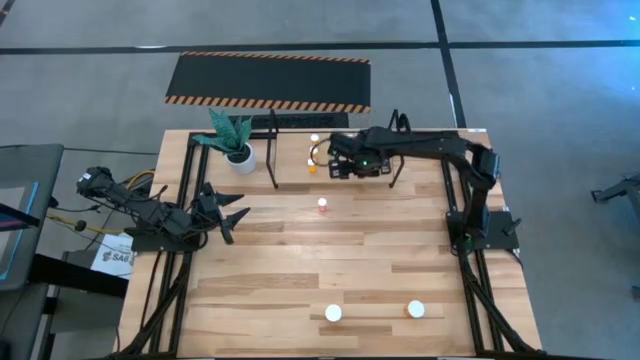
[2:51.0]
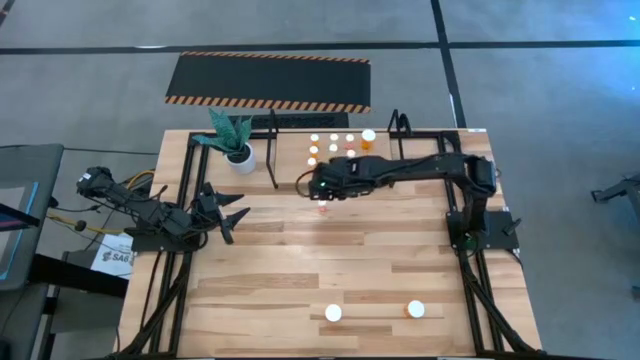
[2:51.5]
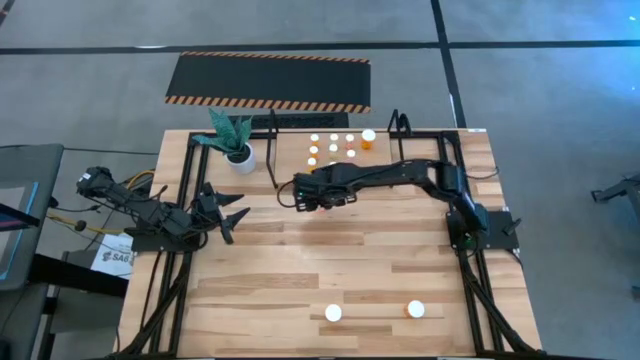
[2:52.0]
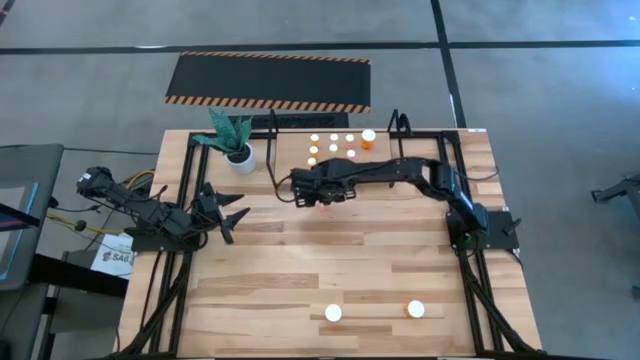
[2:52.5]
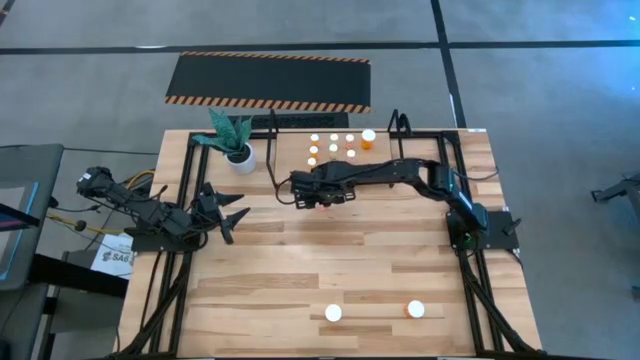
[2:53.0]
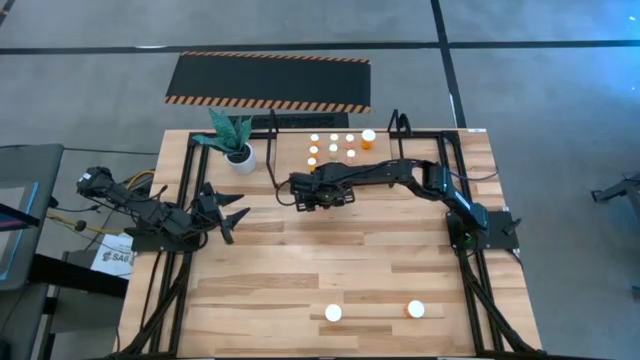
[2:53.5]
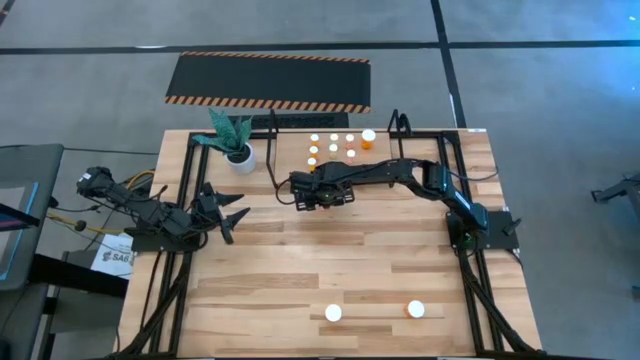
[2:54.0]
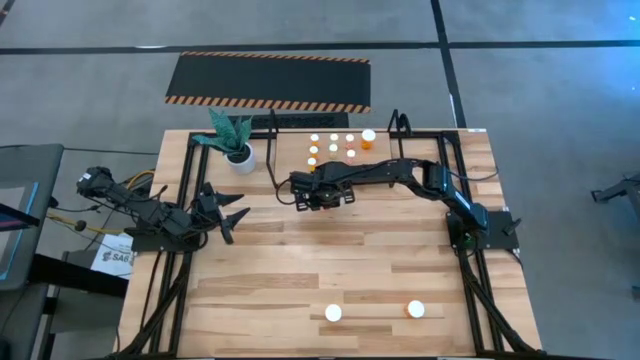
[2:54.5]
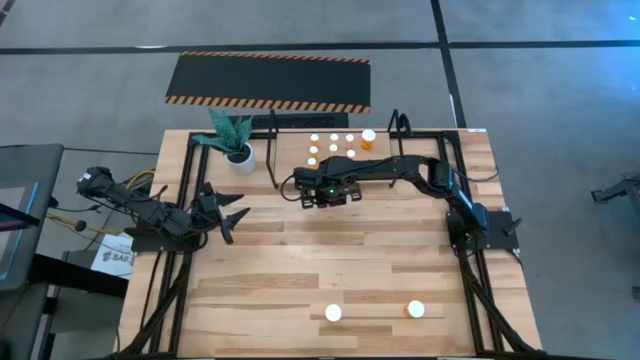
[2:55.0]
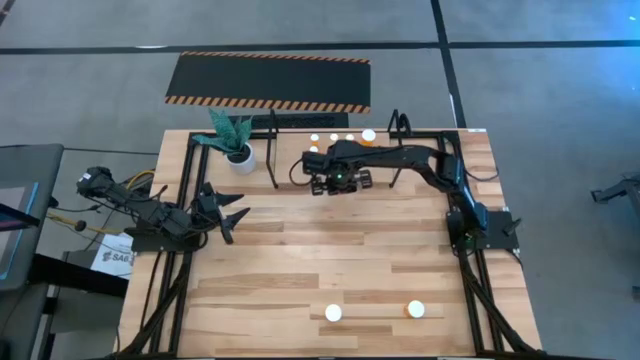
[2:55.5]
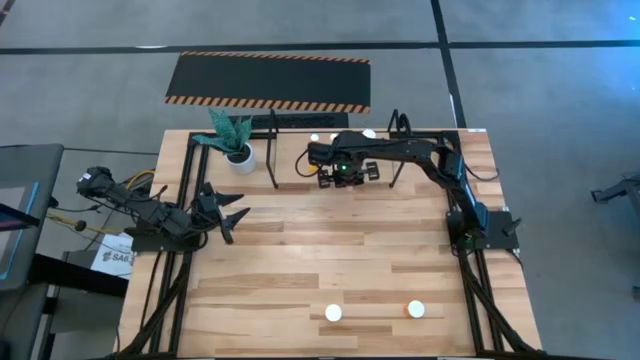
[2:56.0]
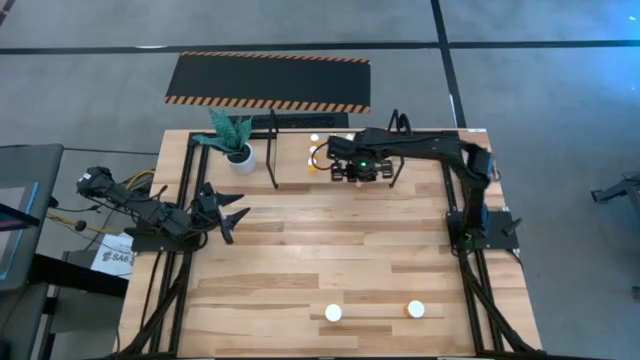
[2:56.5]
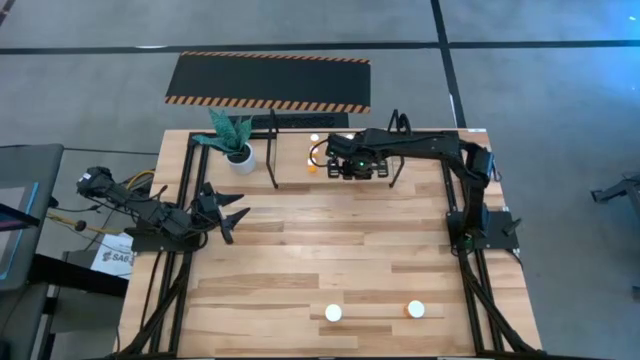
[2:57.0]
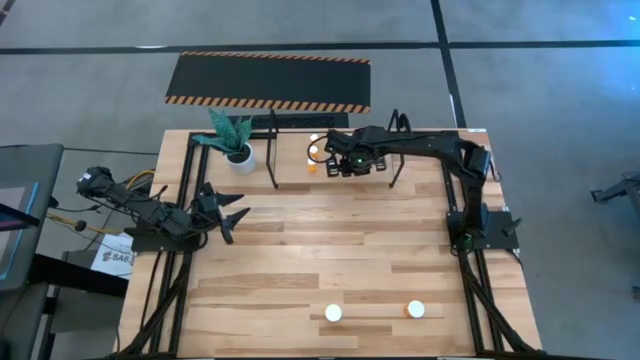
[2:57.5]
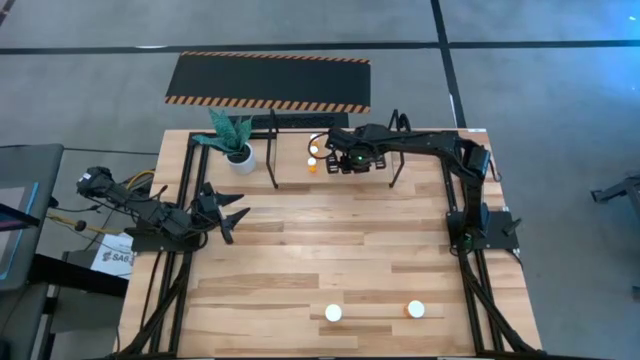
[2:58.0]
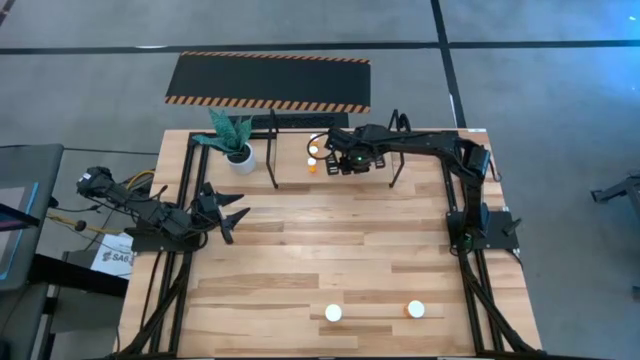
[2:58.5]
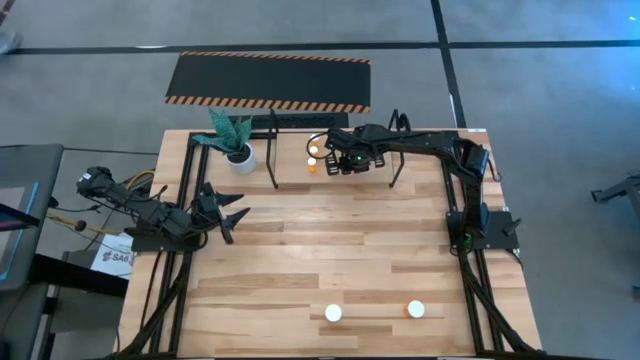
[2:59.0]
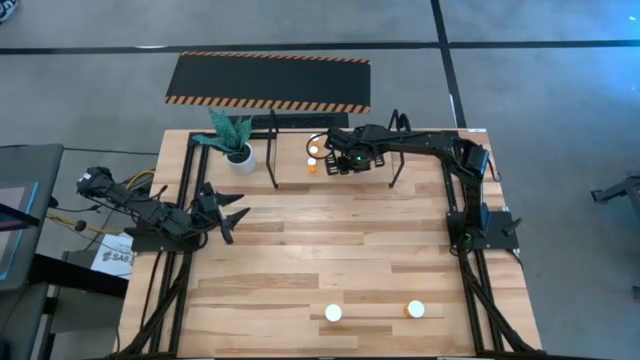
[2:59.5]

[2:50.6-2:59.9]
Task: Pick and place medicine bottles onto shelf by color
Put the small pink pill bottle aligned with the other yellow pill bottles on the shelf

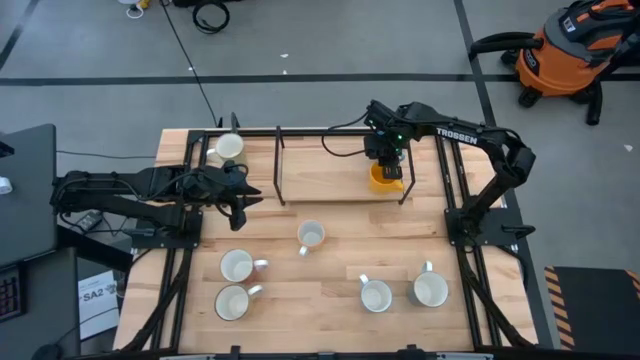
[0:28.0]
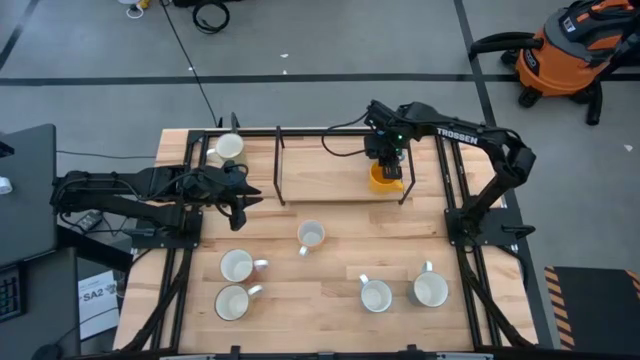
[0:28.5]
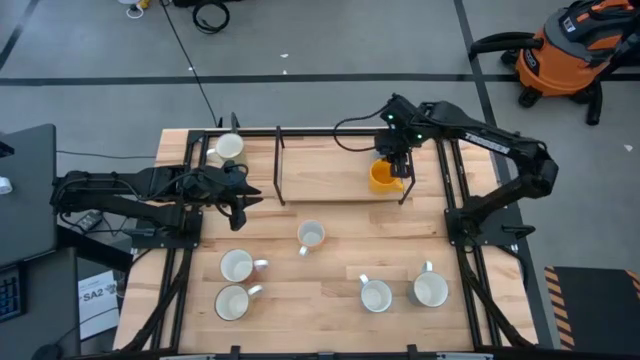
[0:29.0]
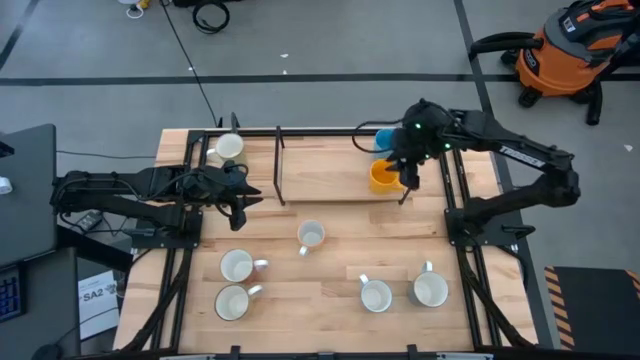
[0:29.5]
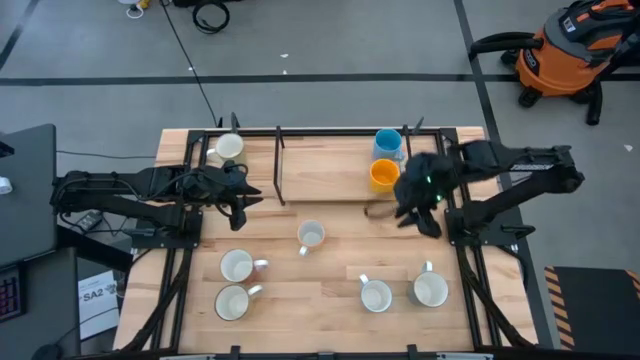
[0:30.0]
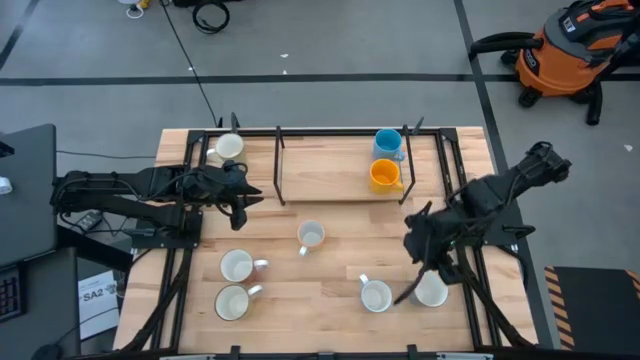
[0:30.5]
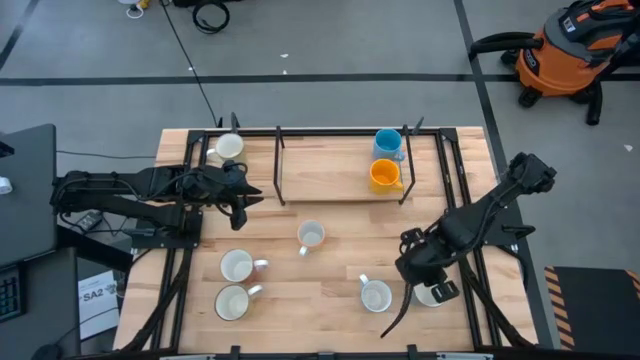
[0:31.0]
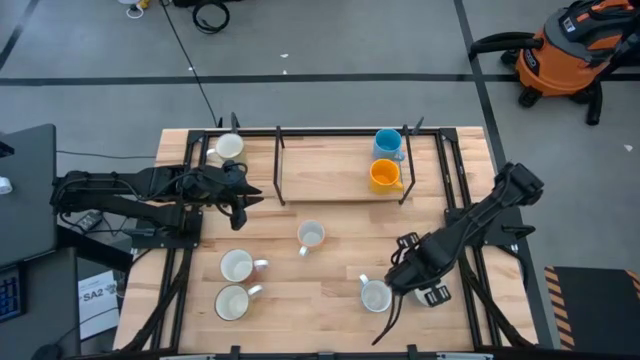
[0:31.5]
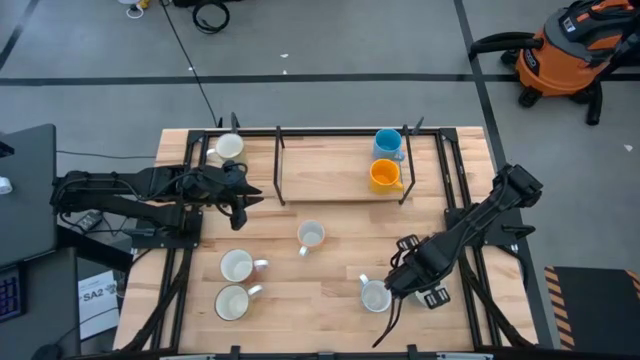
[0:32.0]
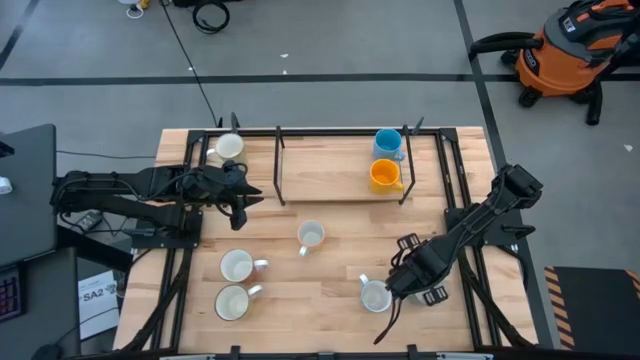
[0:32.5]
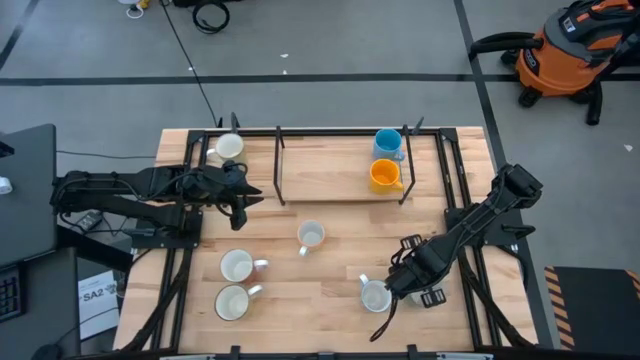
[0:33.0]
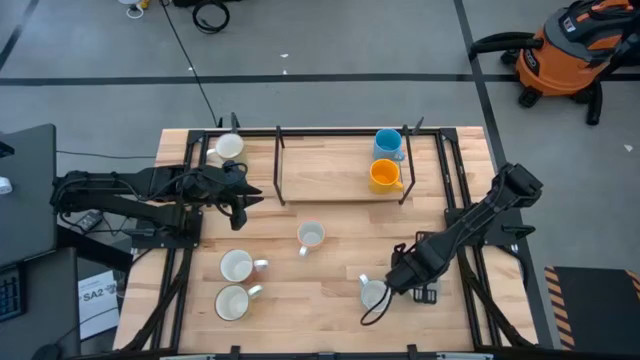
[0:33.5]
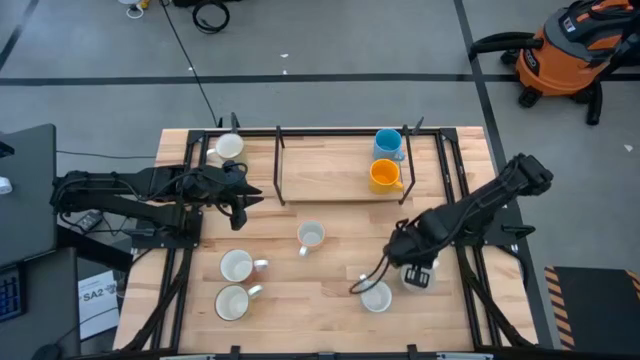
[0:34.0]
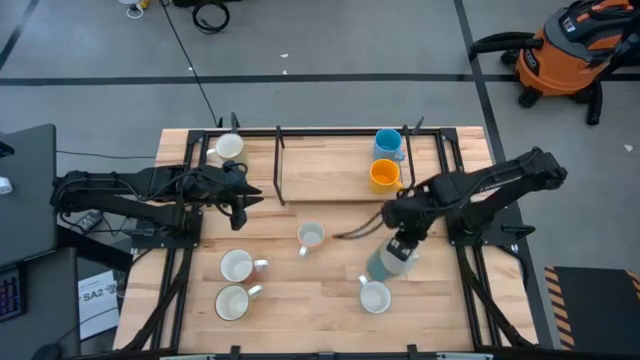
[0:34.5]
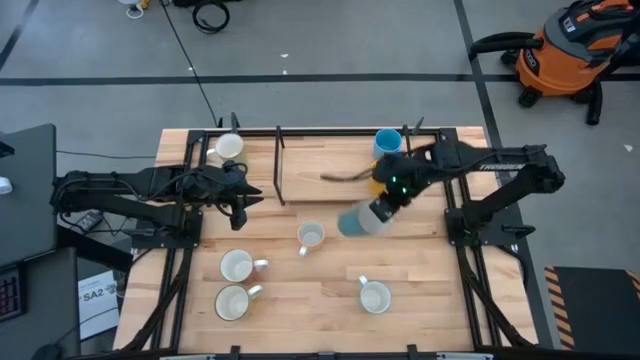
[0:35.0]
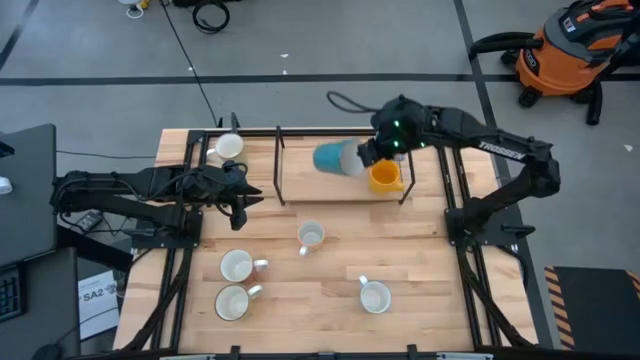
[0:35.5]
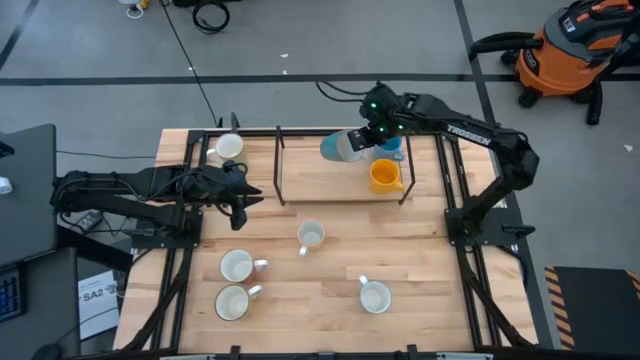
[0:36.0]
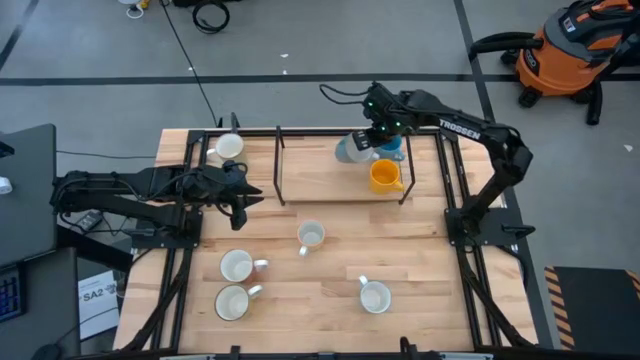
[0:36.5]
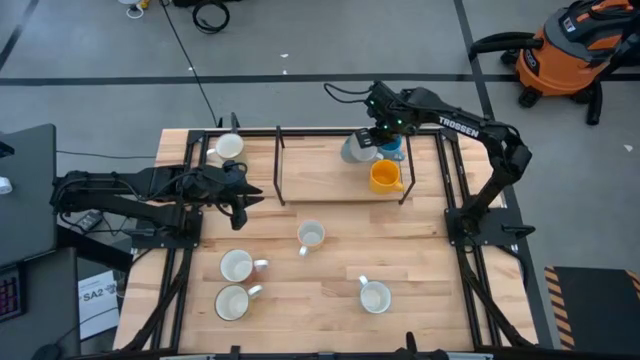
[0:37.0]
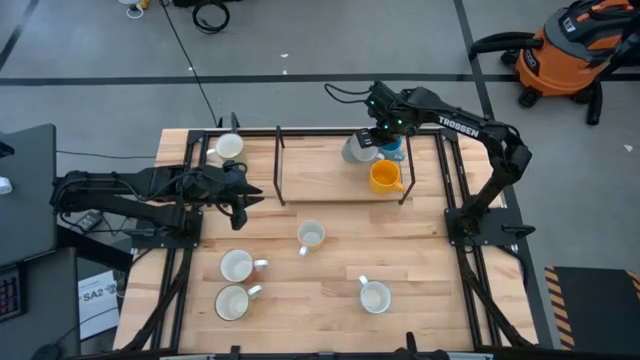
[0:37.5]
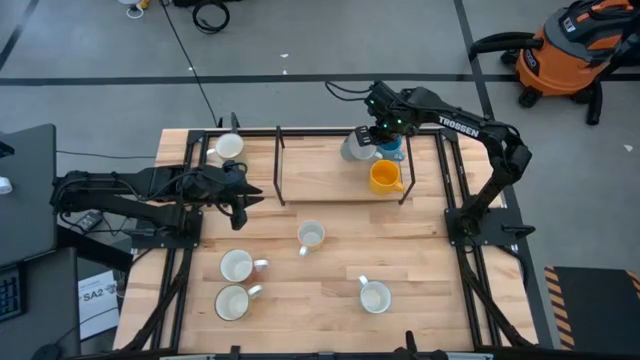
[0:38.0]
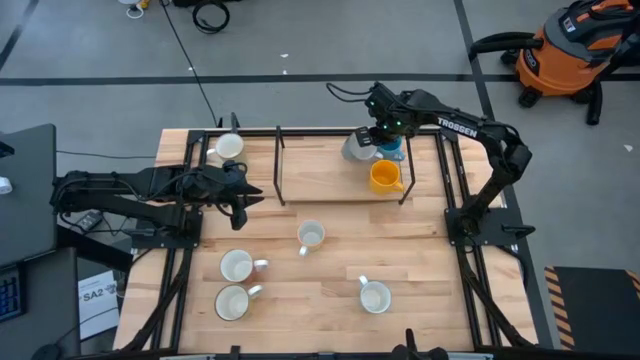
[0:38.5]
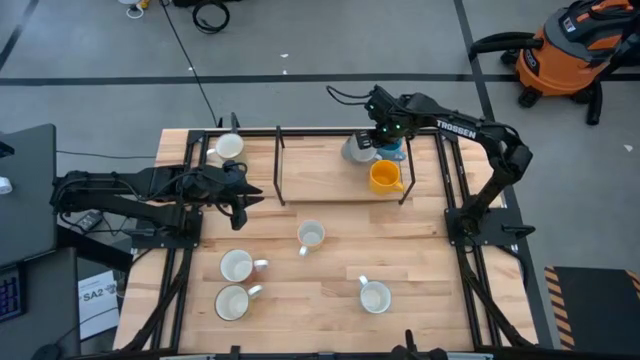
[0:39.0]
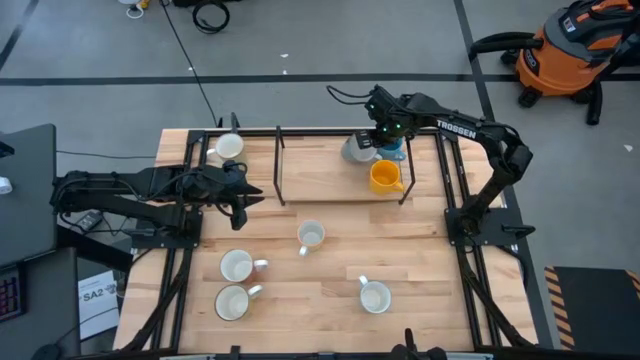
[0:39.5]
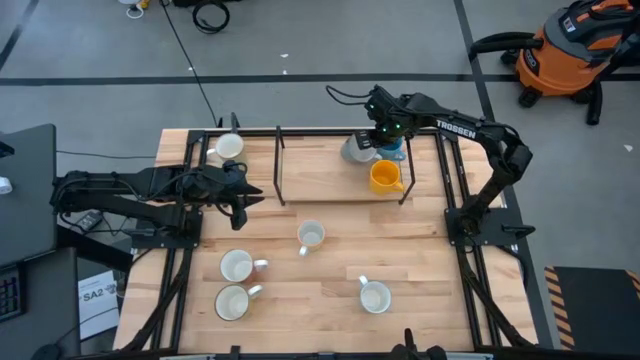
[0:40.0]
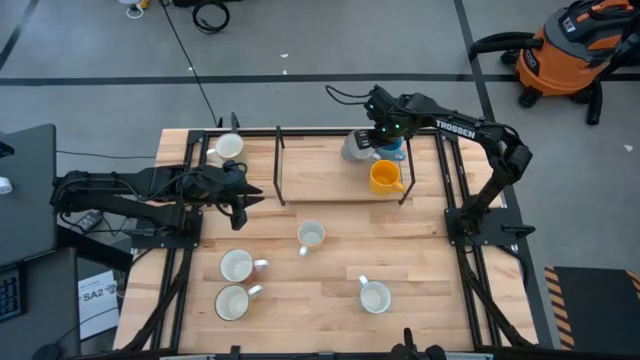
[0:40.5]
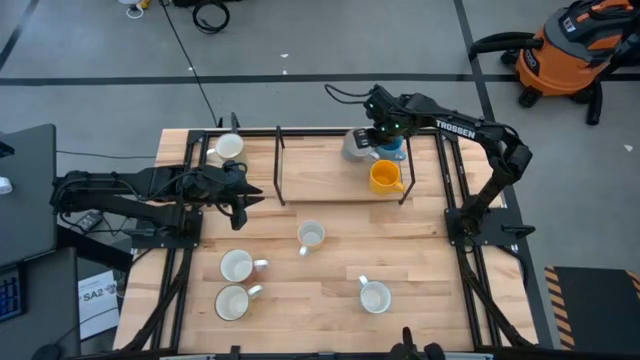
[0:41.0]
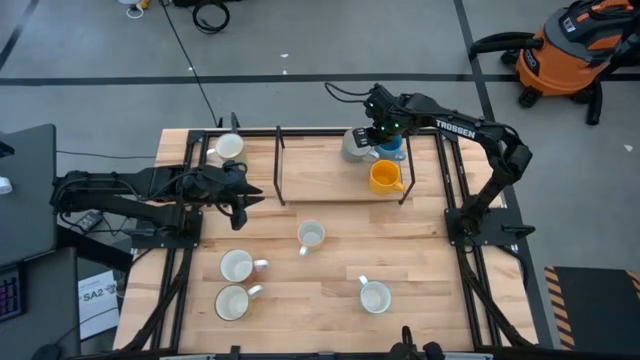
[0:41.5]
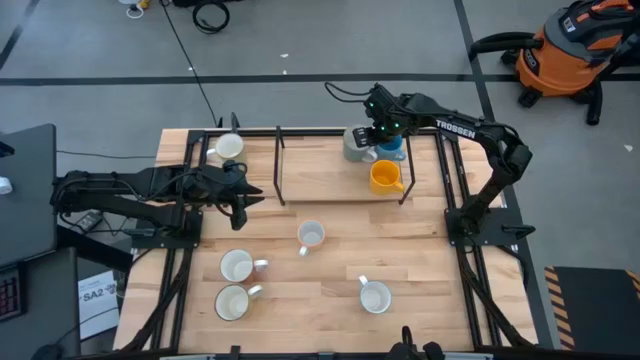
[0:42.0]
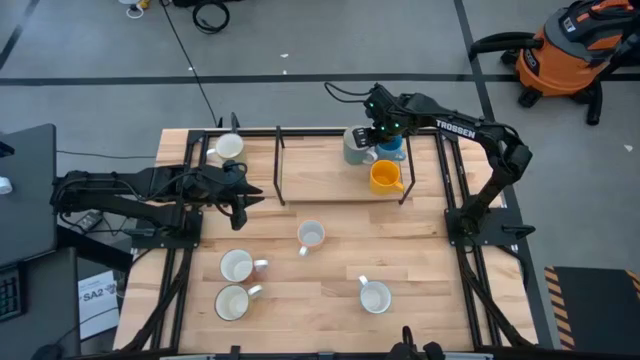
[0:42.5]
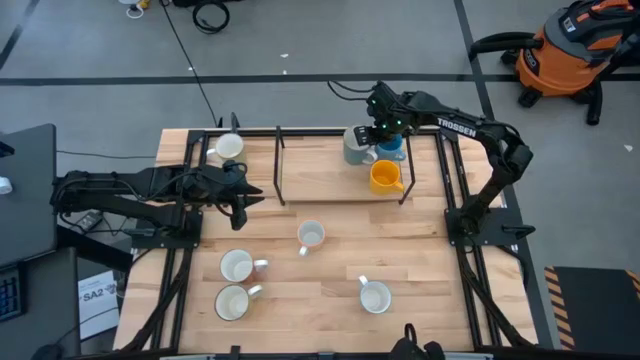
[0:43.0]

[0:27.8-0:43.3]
Task: Place coffee mugs
Put the dark green mug on the shelf
